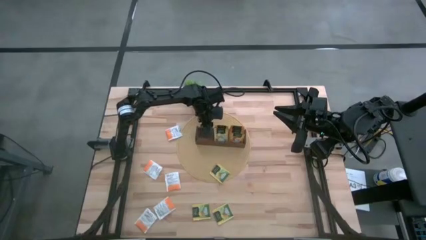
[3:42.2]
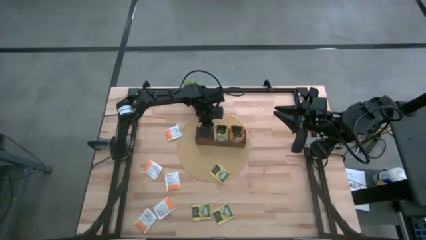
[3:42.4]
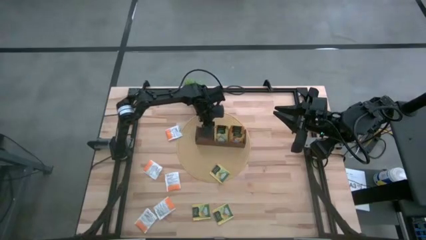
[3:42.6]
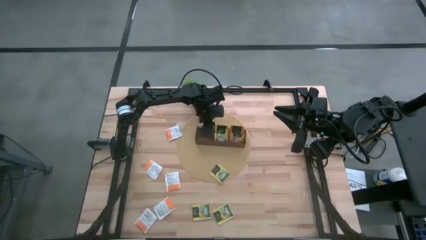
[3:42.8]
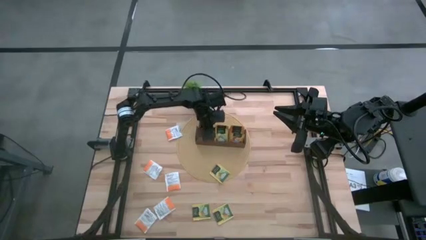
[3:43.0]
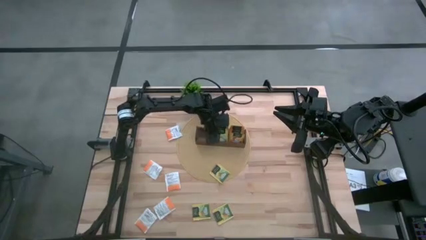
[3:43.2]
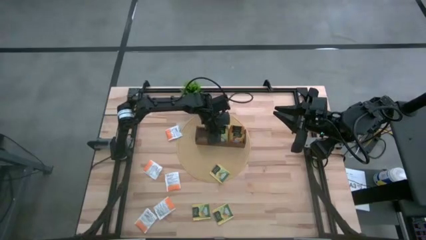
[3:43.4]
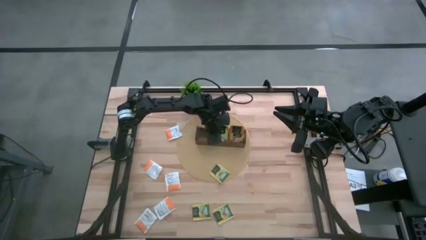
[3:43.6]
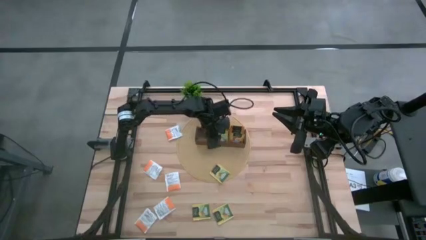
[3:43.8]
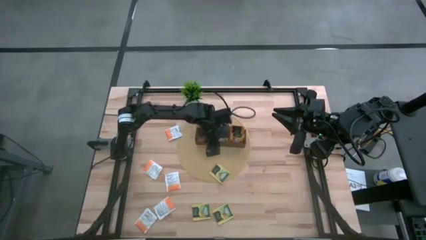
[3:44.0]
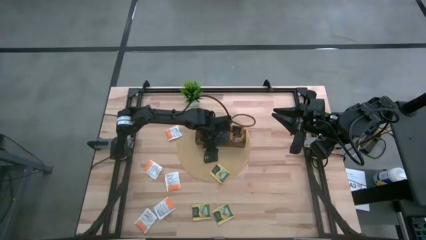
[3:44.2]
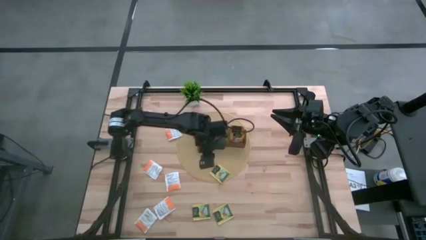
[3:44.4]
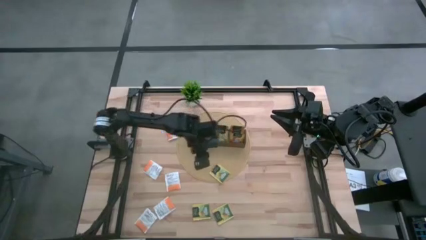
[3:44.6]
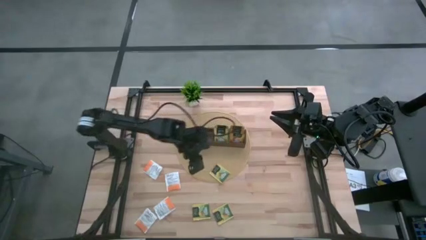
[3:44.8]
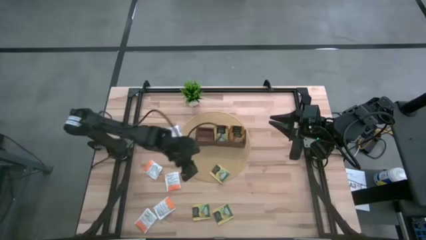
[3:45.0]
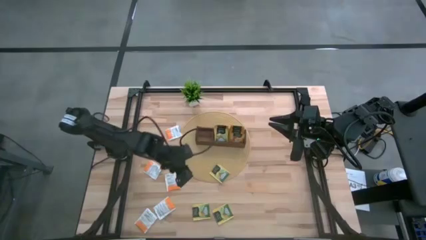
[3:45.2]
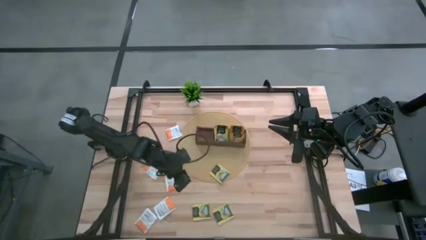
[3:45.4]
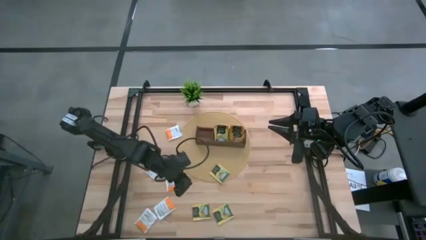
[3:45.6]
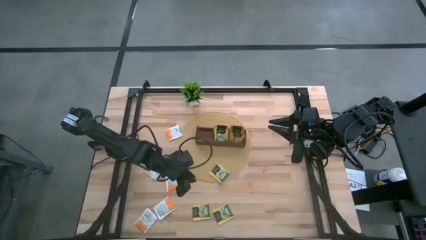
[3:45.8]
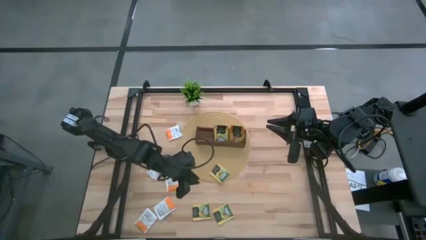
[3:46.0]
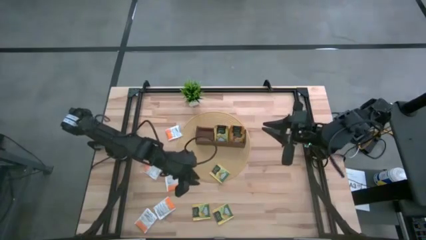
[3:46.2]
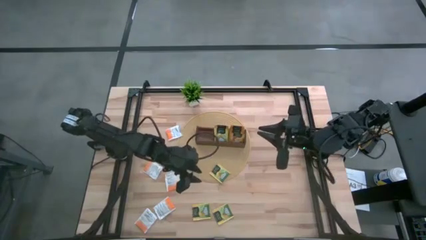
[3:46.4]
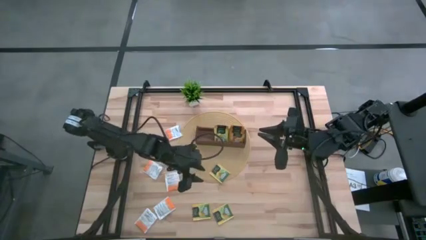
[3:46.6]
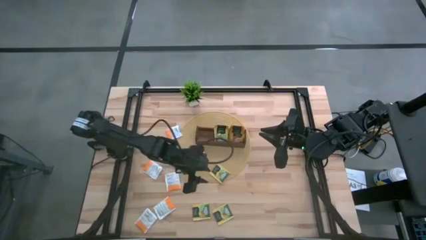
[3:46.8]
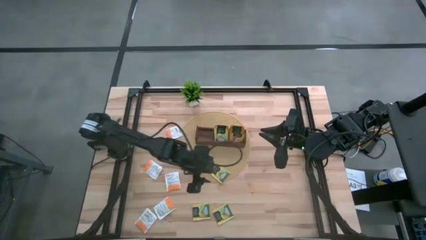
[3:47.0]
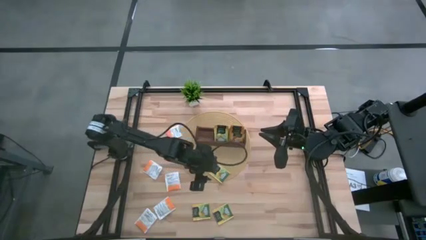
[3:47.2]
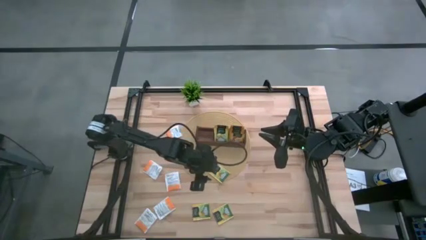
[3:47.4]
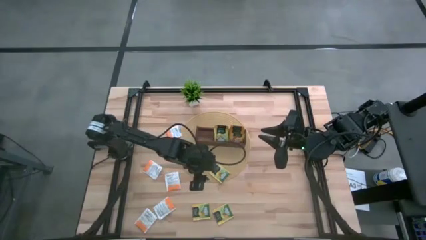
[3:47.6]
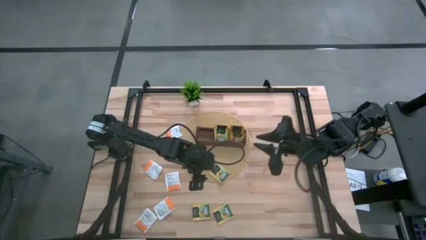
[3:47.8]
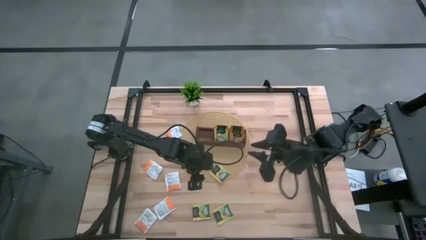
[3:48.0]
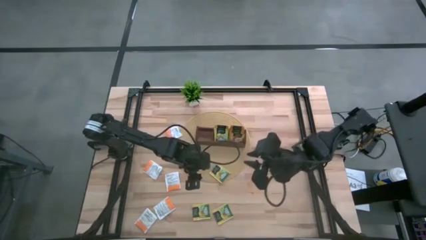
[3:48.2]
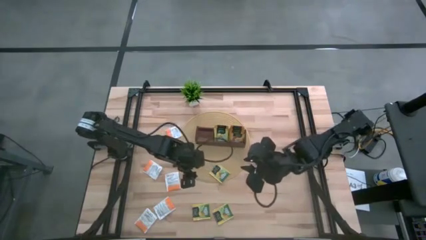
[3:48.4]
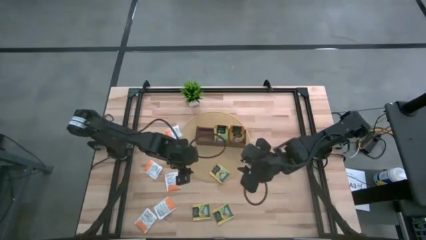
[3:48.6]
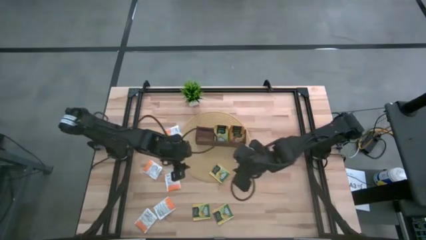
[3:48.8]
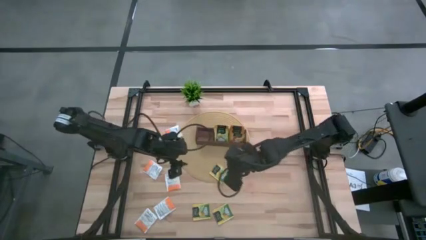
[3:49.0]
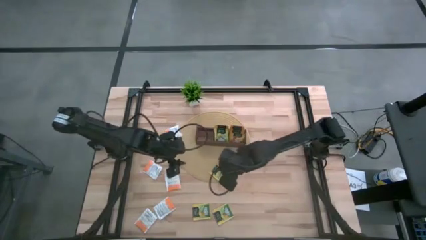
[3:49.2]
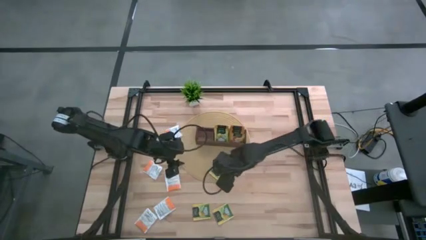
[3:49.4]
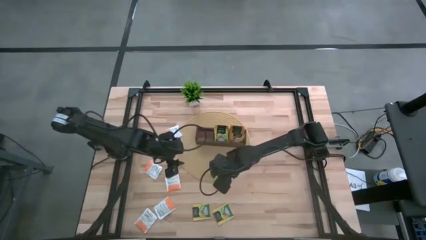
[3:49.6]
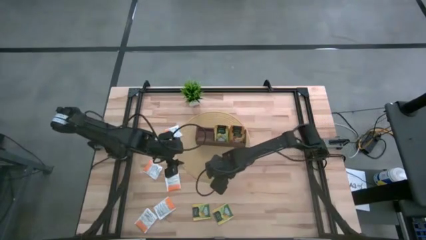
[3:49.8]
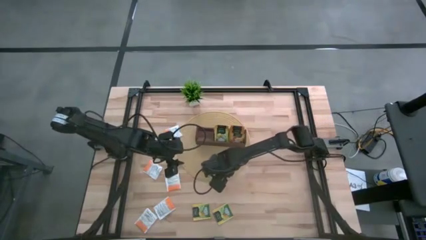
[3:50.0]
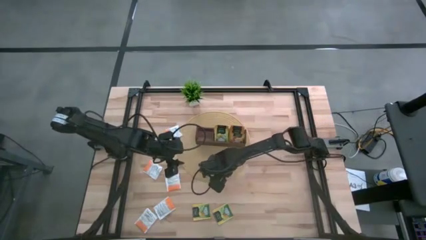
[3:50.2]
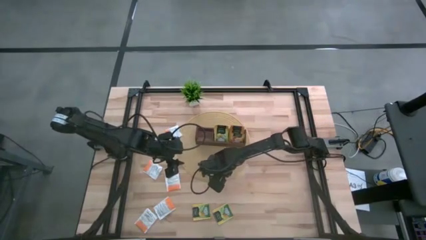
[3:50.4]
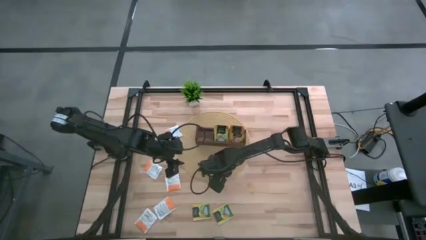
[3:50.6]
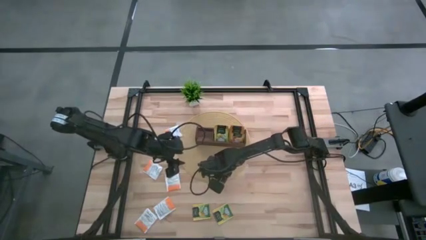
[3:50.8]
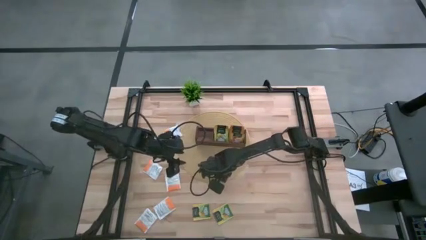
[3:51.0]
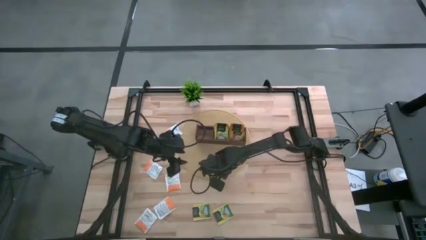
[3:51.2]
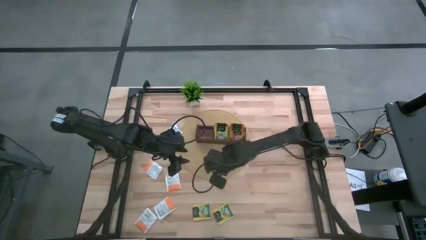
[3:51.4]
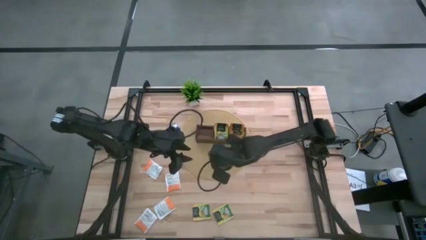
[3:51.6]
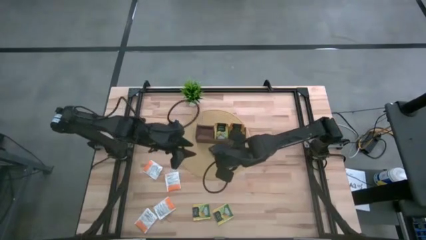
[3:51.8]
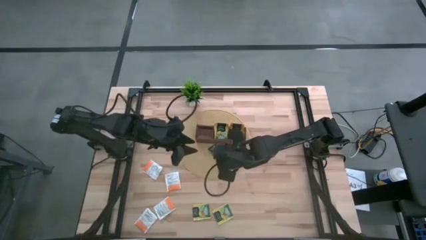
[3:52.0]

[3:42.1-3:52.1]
Task: Pick & Place Tea
Put the yellow tea bag into the middle section of the wooden organizer

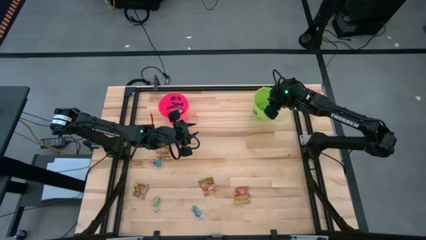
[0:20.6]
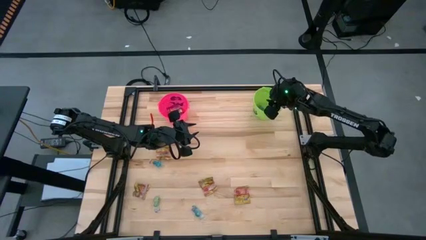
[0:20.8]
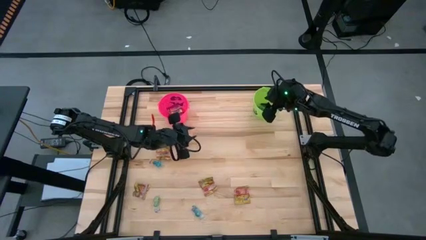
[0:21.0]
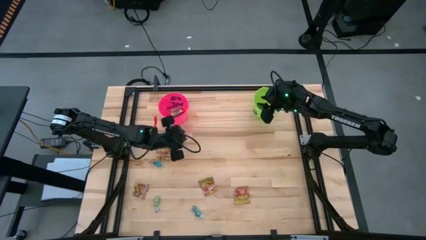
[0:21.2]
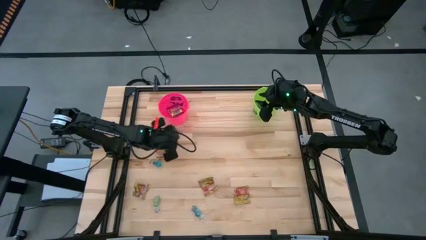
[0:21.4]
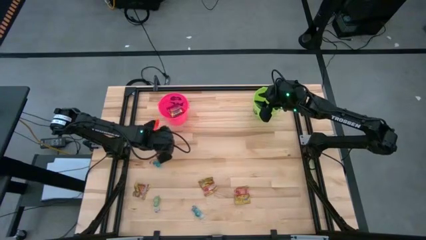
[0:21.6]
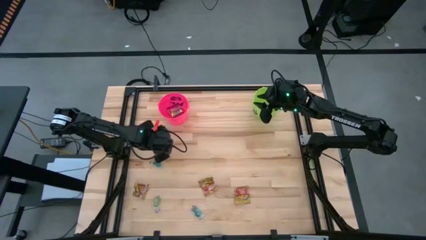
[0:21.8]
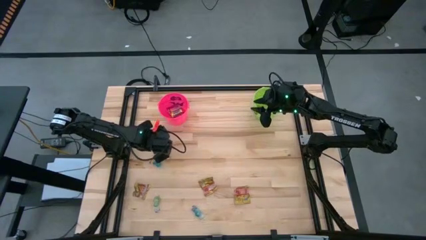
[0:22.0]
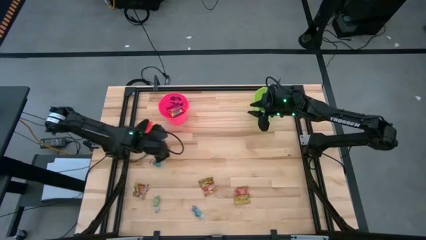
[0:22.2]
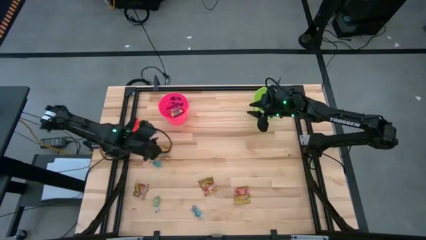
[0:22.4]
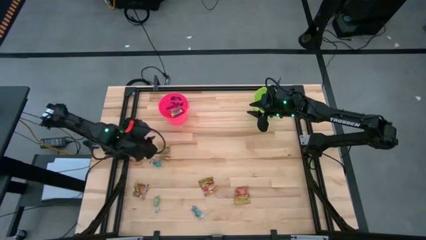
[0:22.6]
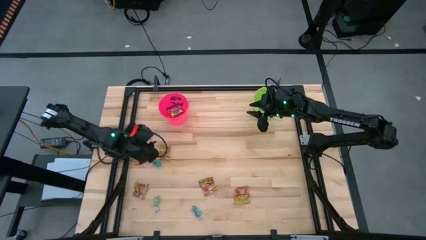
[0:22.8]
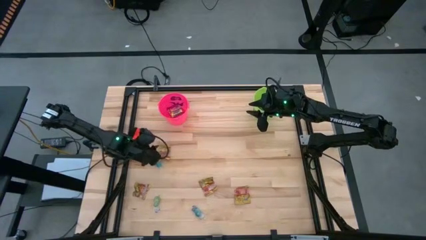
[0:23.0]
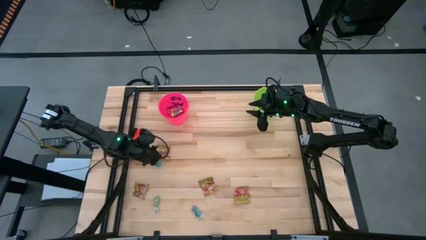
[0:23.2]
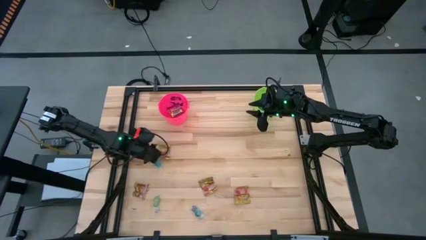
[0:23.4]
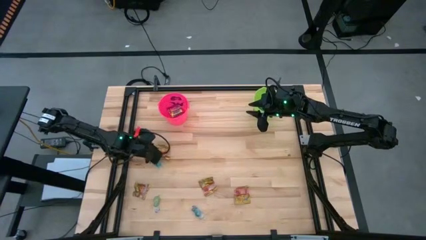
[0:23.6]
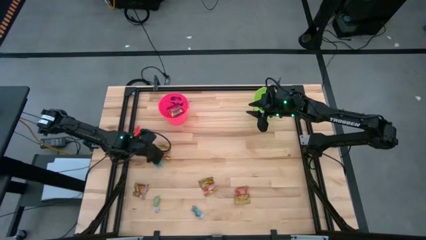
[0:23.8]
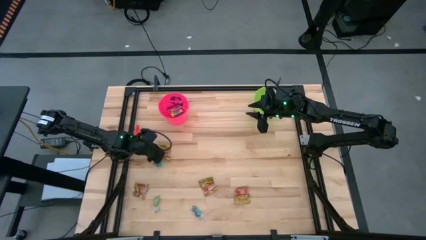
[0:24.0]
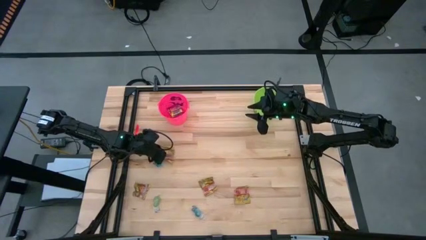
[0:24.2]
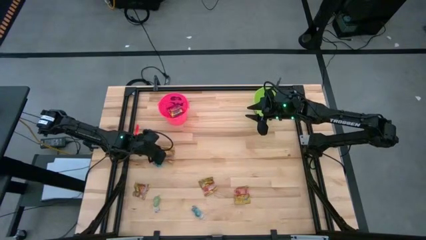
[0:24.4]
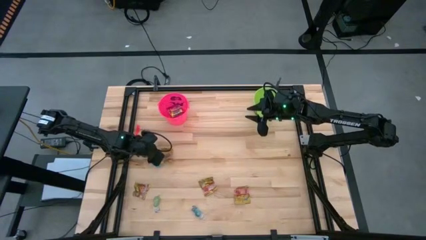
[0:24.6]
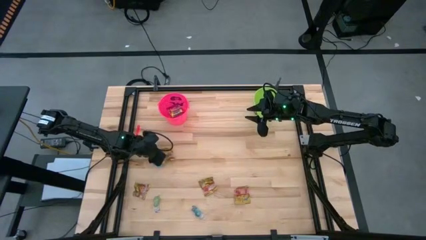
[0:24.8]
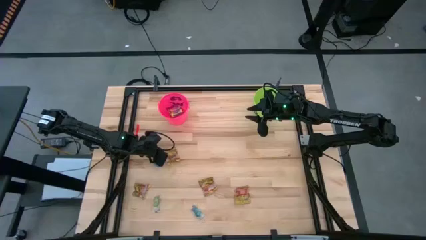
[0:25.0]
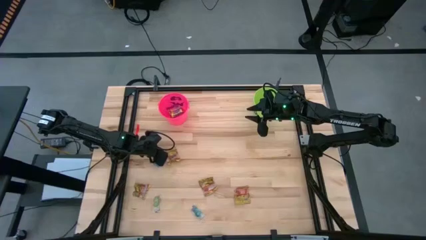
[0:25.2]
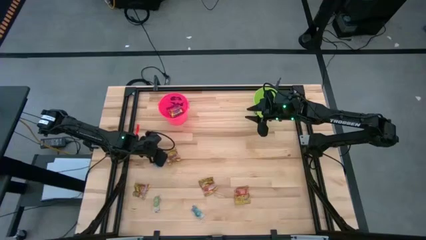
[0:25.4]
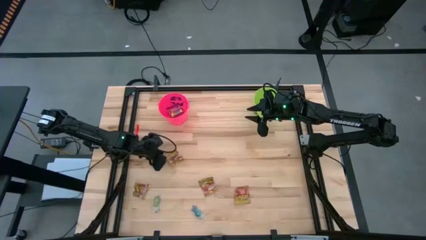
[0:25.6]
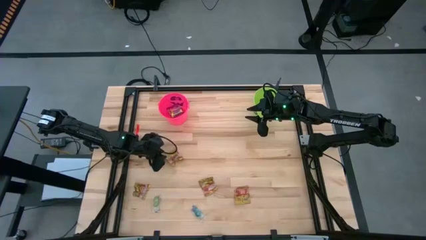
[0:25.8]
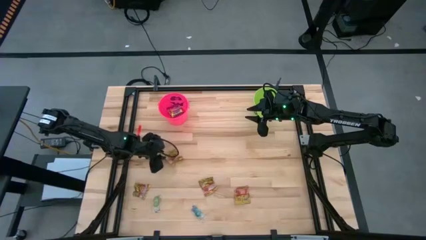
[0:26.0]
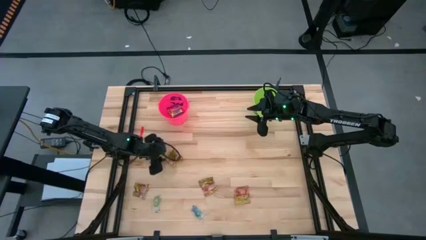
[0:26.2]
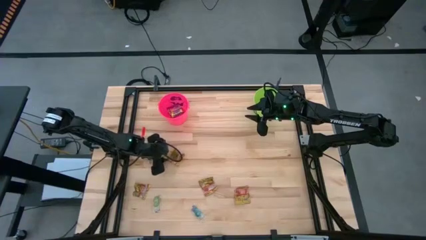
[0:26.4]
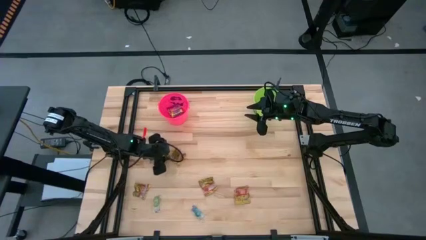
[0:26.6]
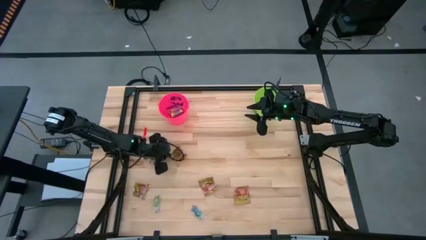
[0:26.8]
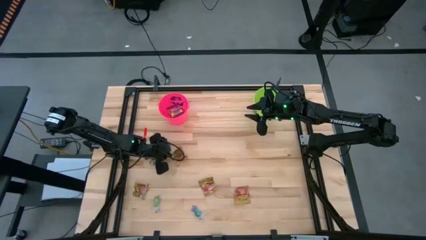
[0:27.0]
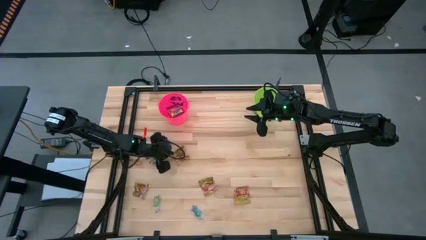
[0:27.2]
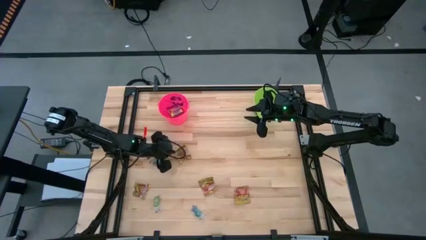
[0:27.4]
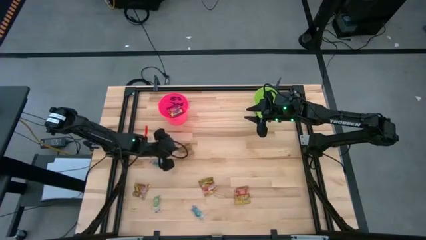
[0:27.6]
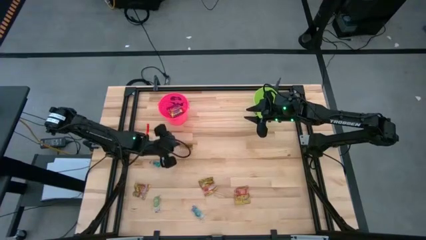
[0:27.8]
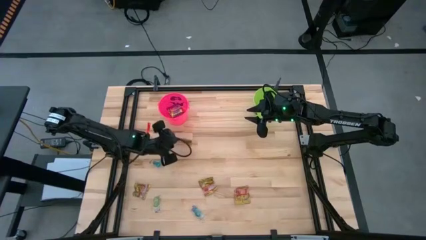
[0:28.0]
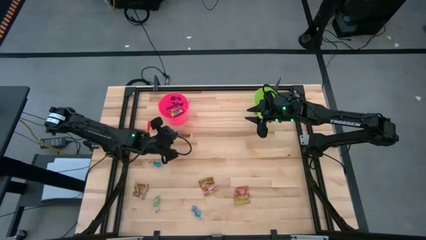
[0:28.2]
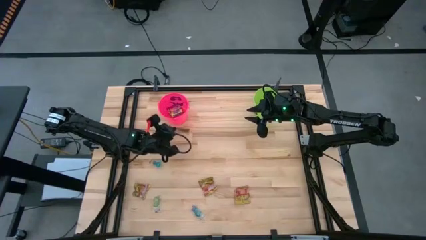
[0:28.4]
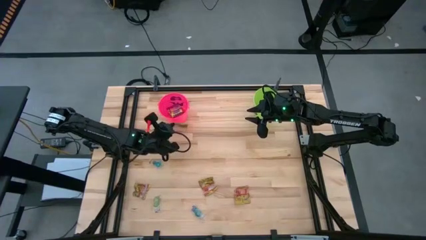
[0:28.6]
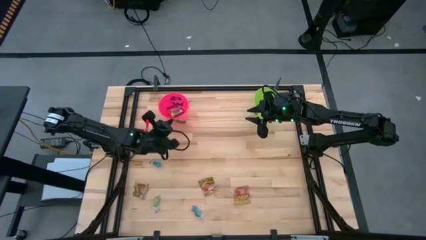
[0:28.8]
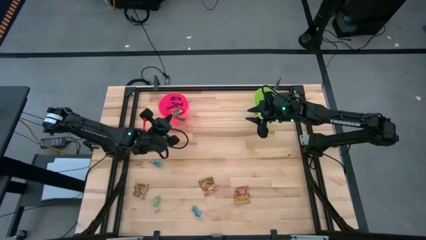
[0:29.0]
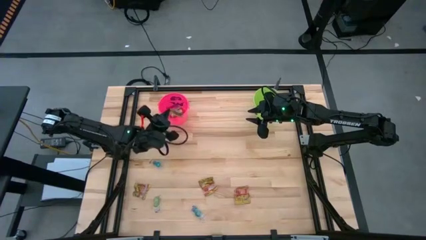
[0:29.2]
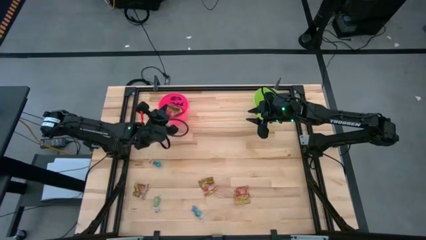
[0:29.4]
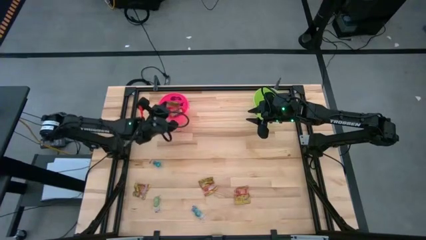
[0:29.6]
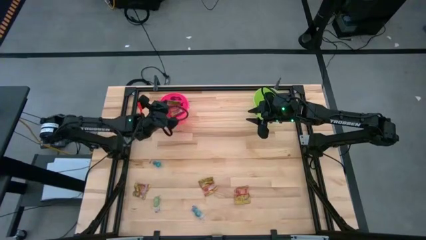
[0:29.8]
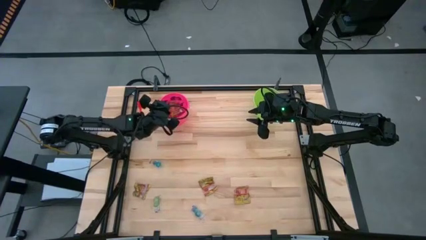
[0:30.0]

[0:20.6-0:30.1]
Task: Sort candy by brand, put in halloween buckets
Put the gold red candy into the pink bucket
